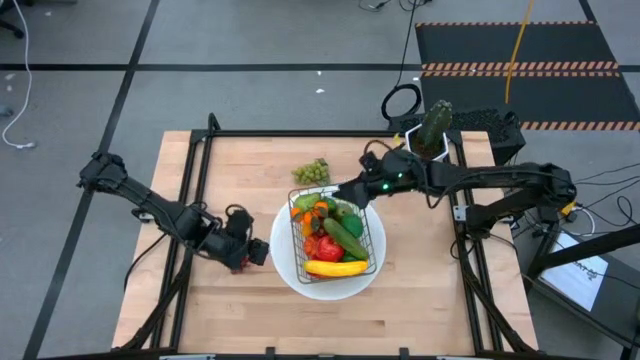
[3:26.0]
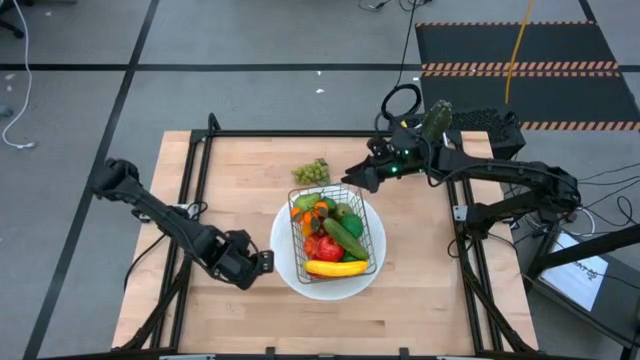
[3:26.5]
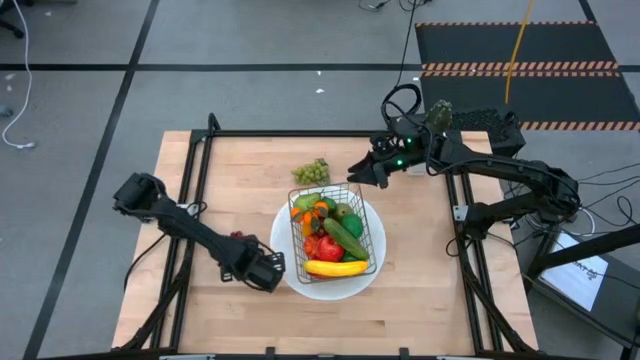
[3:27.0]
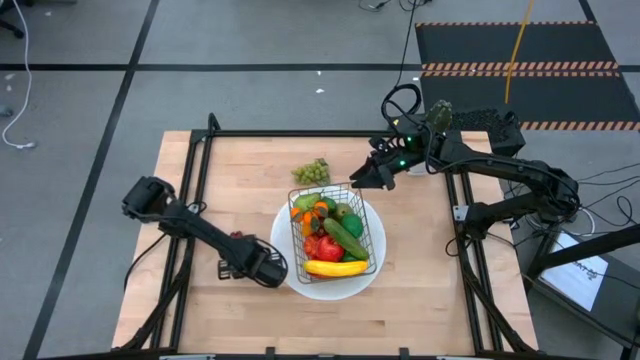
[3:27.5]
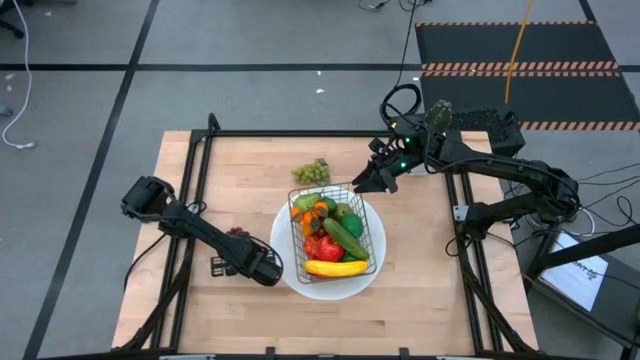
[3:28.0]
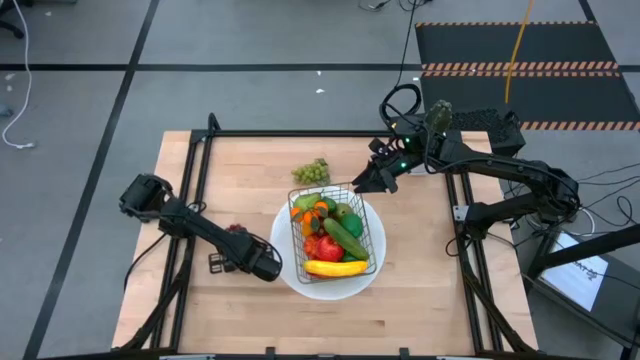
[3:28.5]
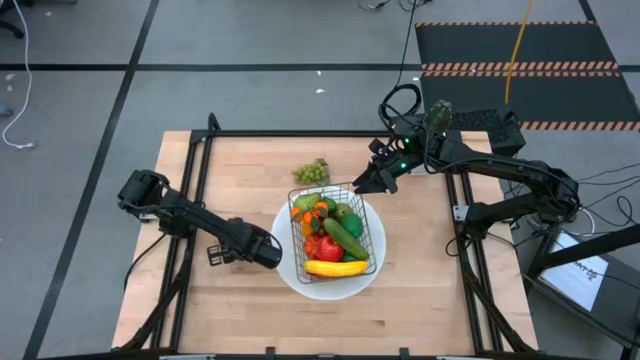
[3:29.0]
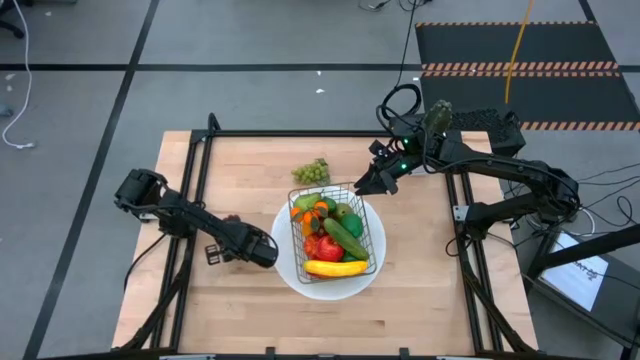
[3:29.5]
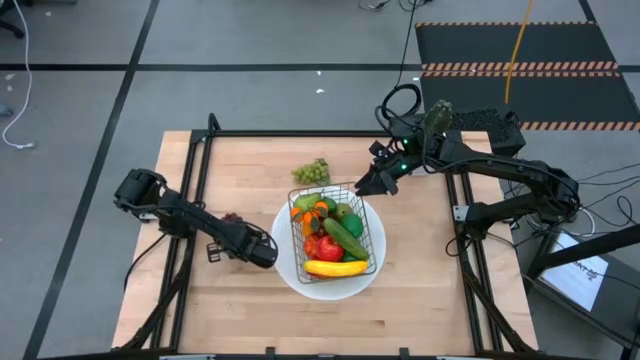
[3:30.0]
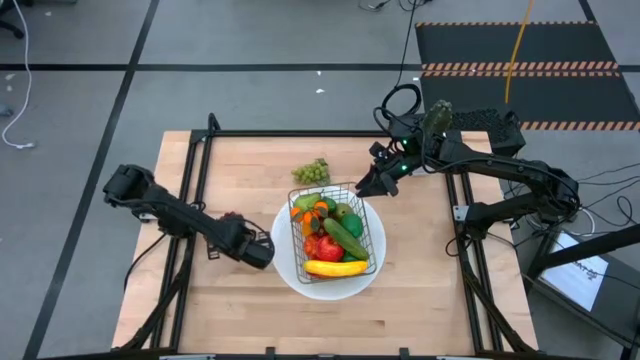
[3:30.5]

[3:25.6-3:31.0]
Task: Build produce basket
Put the red grapes into the black wire basket

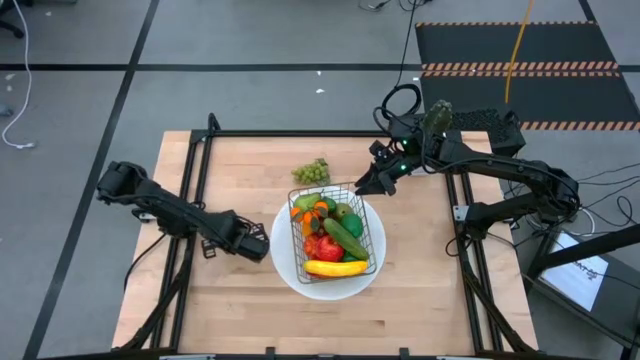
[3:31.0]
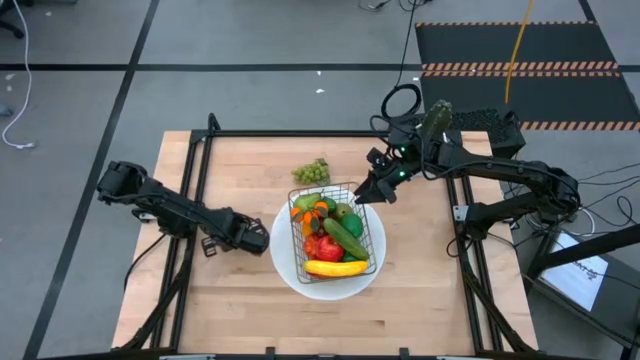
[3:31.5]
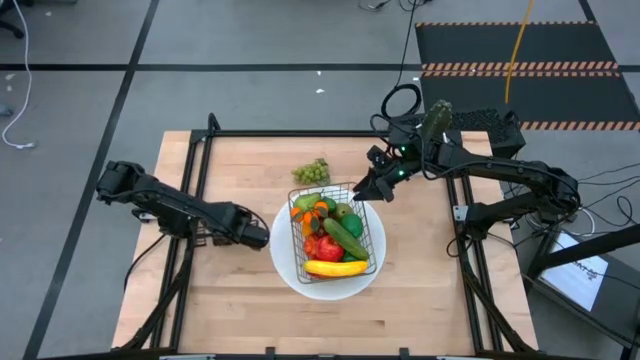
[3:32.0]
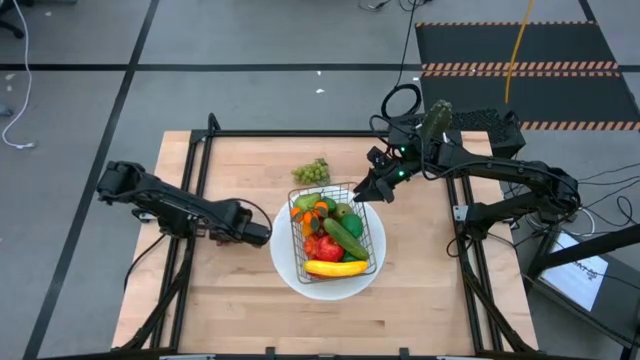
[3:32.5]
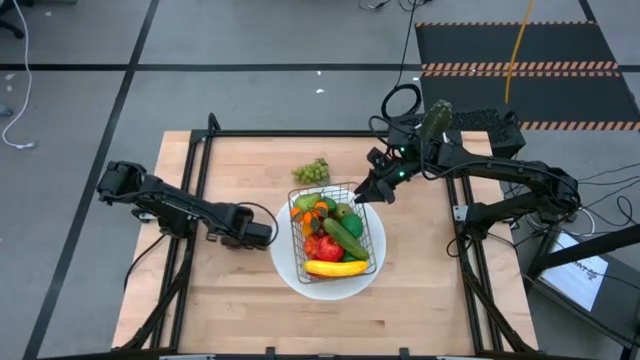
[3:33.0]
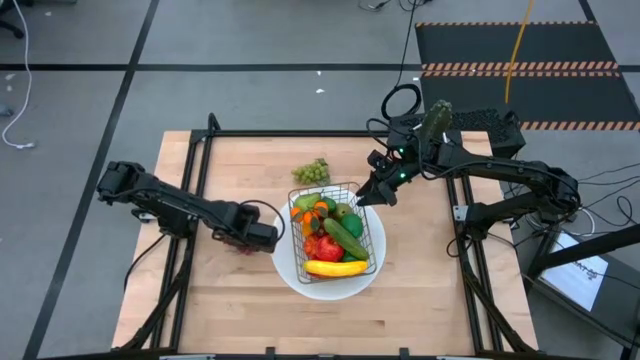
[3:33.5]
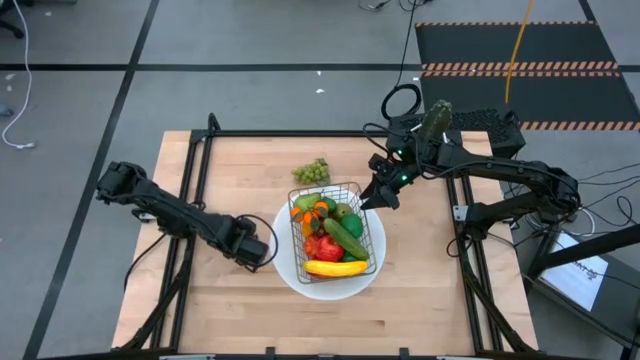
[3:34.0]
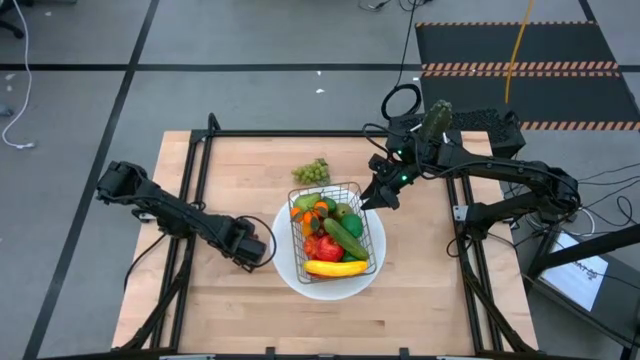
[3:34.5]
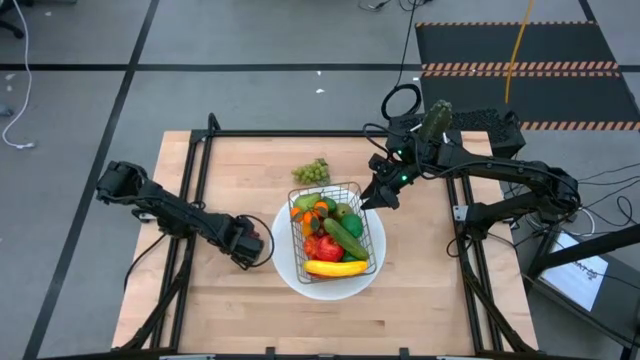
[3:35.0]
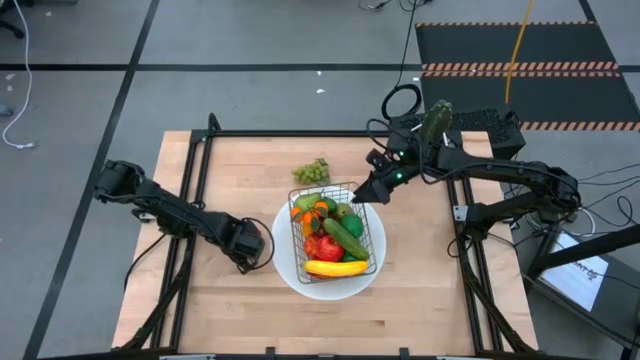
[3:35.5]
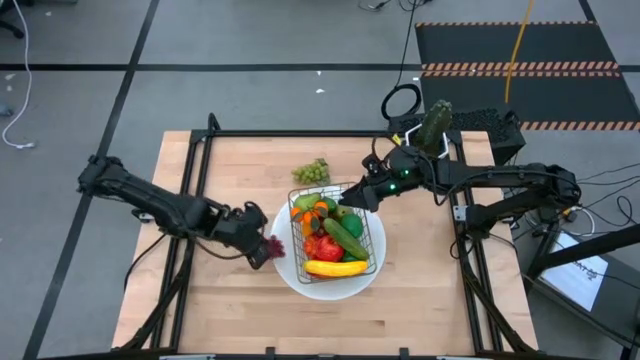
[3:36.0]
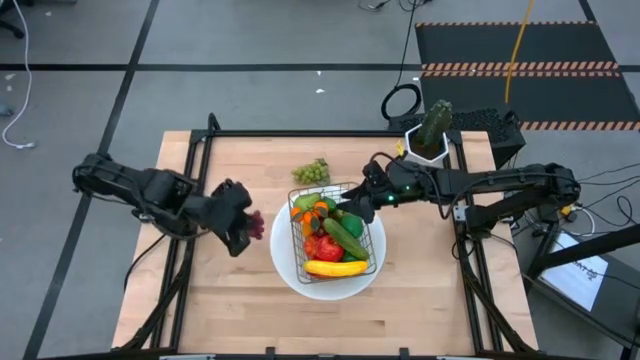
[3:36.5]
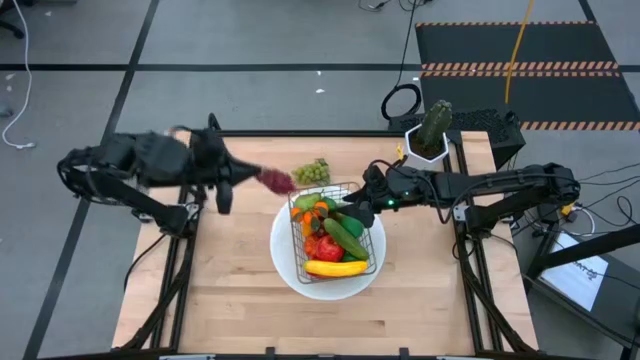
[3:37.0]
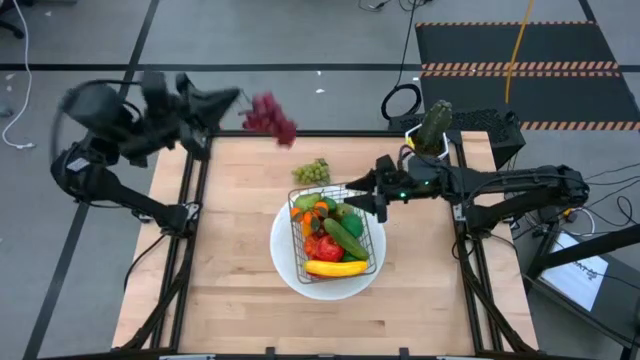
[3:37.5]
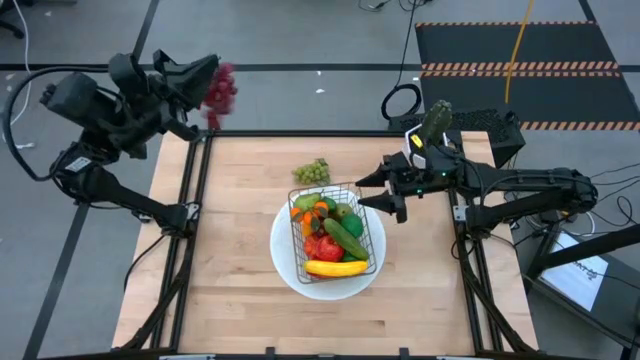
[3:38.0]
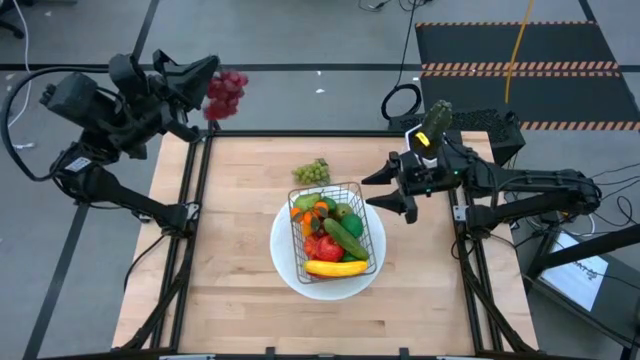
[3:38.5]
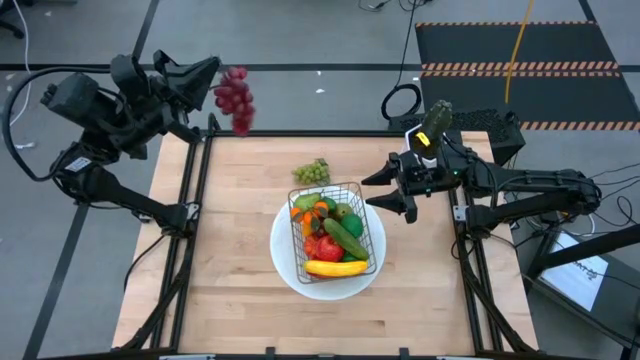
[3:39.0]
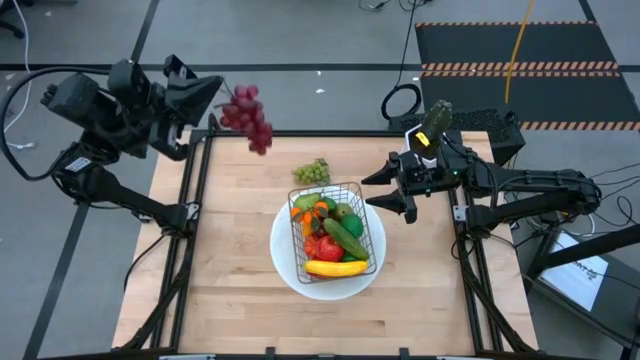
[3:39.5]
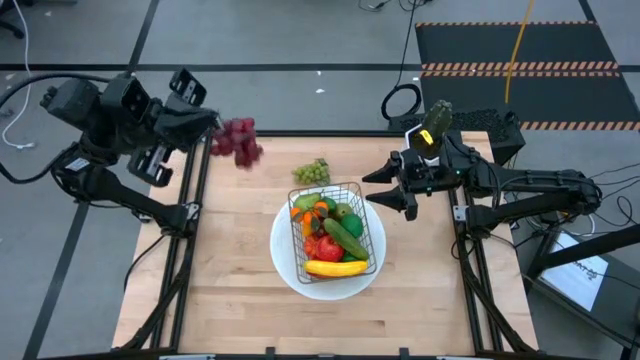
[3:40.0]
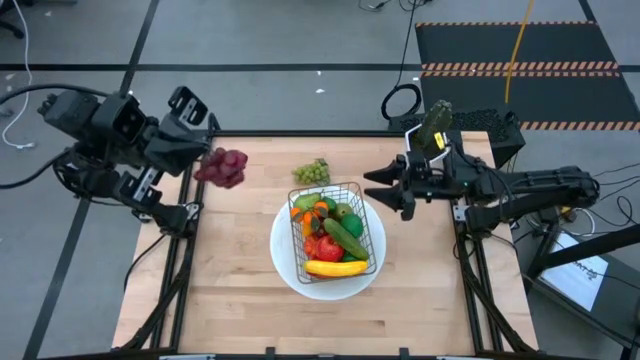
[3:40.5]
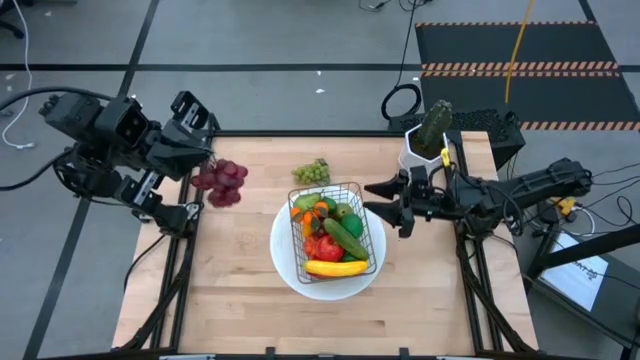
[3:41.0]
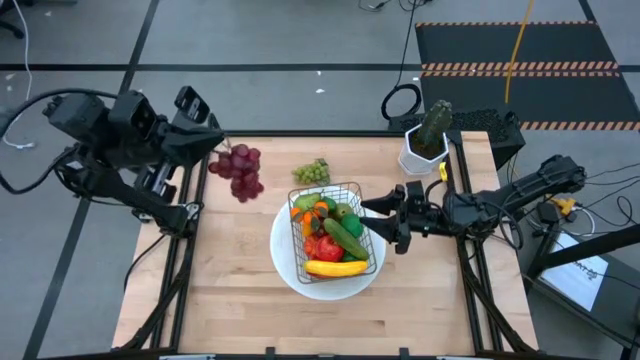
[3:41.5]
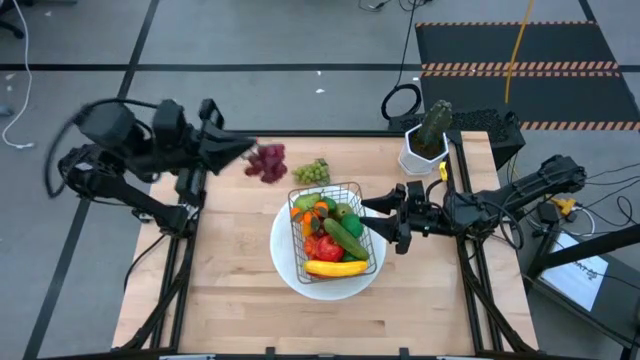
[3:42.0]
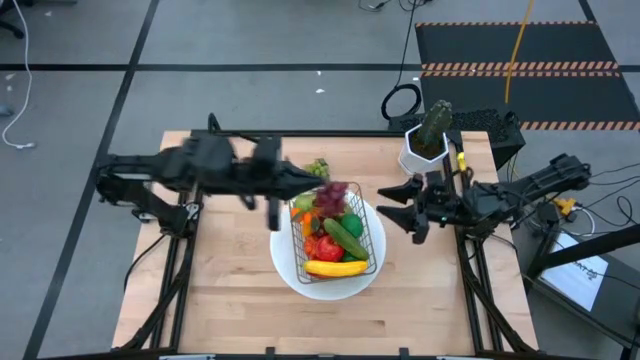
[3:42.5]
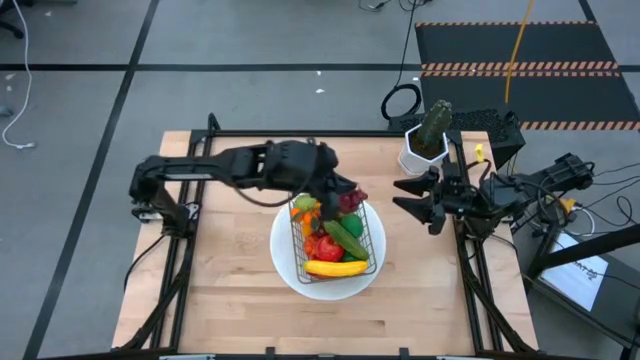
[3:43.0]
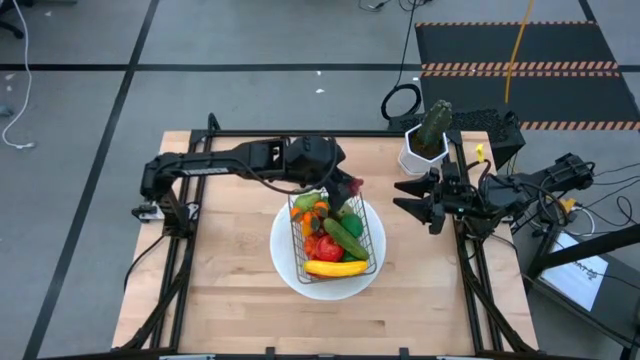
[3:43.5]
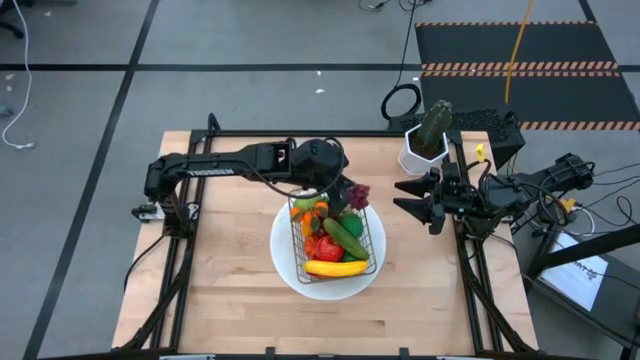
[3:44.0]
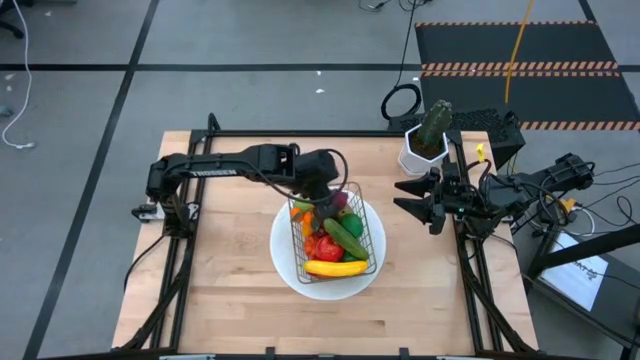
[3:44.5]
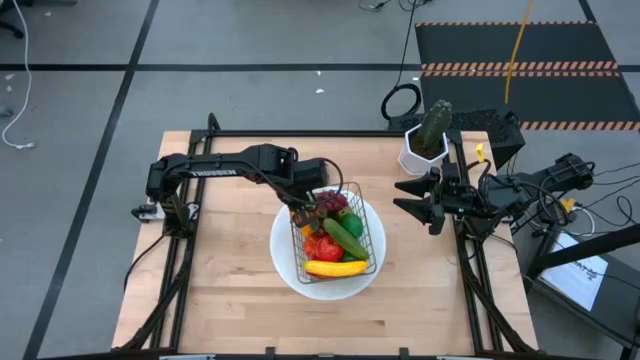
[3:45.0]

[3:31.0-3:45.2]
Put the red grapes into the wire basket

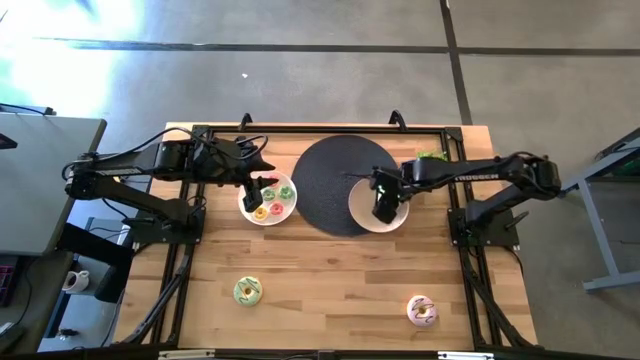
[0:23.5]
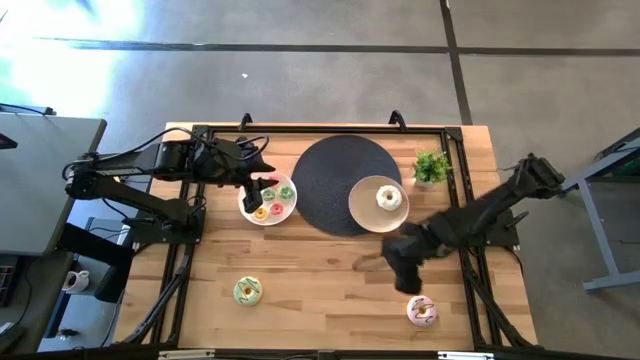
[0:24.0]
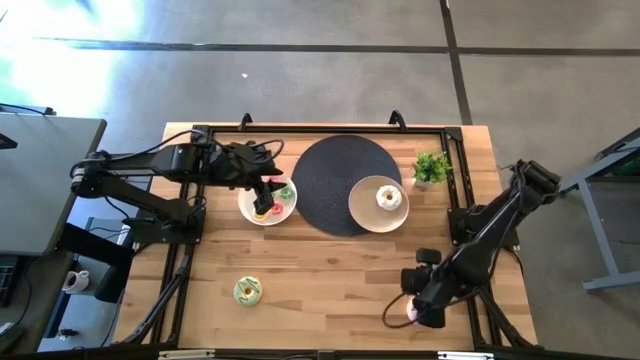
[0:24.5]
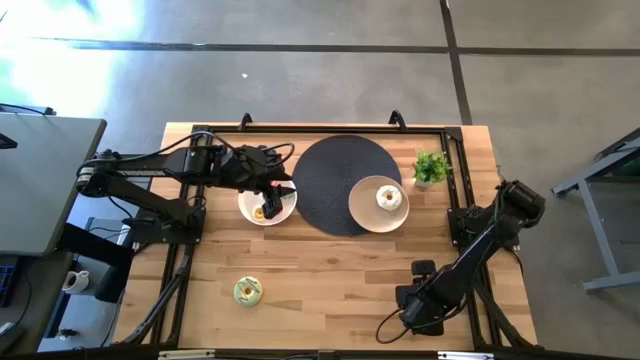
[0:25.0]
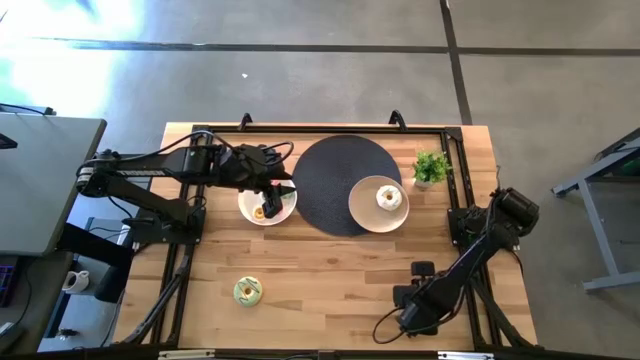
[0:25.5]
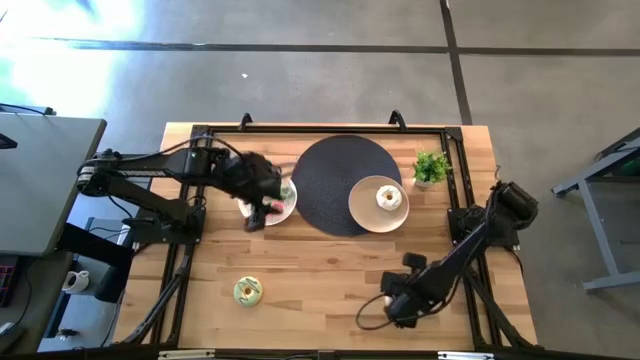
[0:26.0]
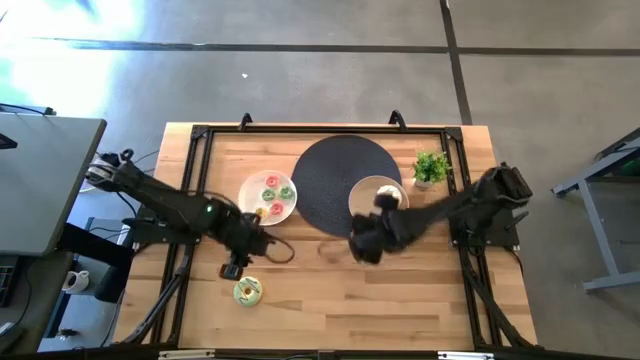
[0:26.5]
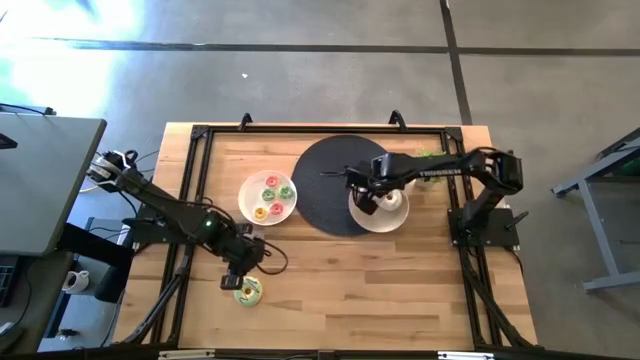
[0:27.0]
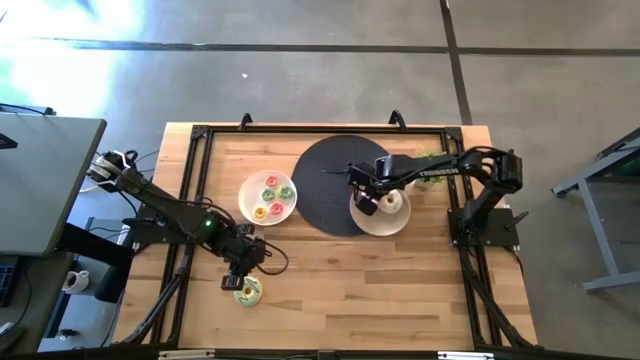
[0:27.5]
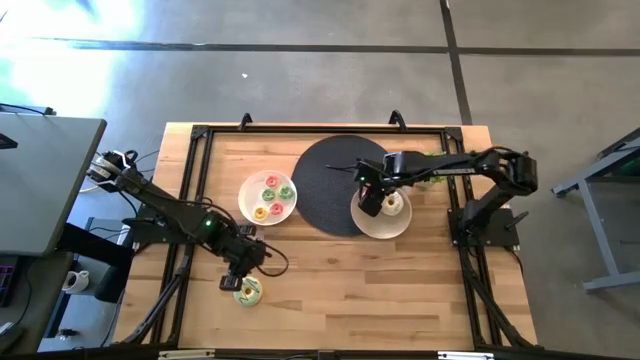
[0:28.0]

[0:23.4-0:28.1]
Task: Pick & Place donuts
Put the large violet donut into the brown plate
